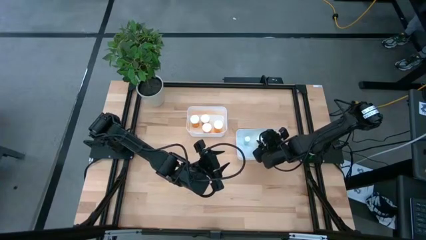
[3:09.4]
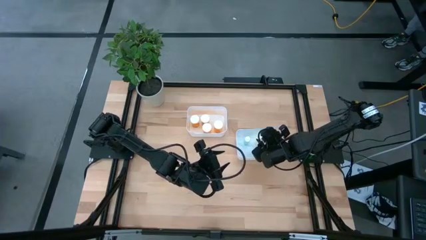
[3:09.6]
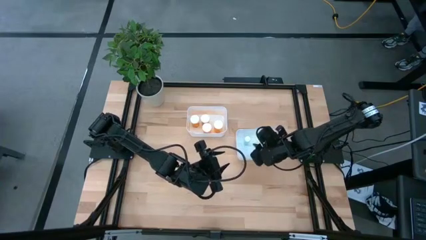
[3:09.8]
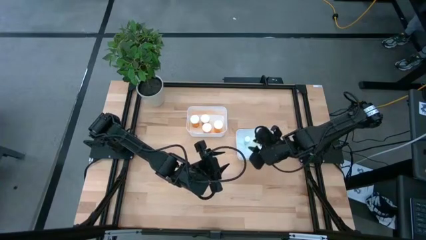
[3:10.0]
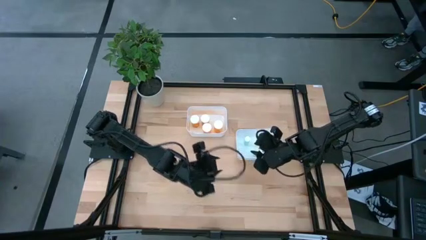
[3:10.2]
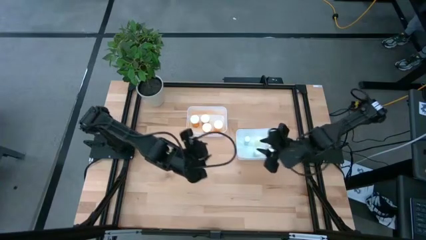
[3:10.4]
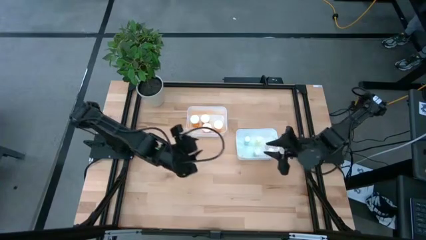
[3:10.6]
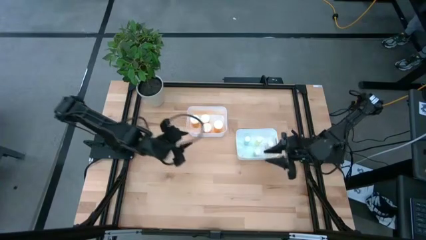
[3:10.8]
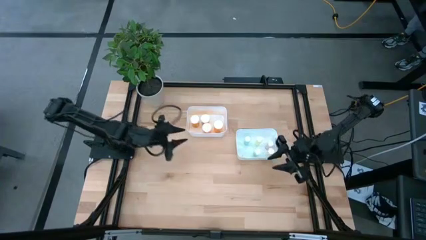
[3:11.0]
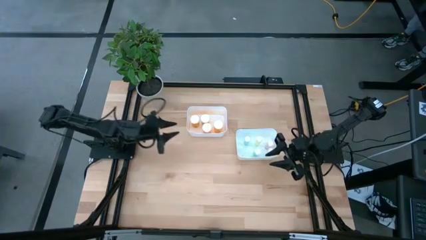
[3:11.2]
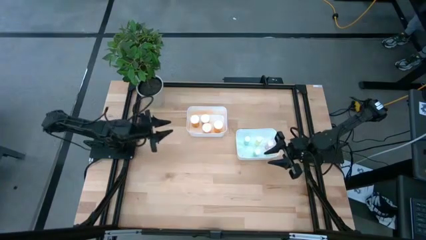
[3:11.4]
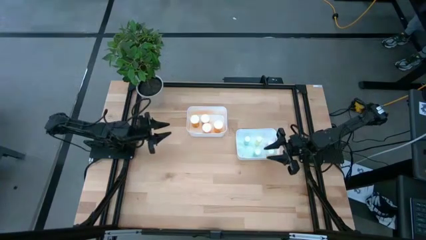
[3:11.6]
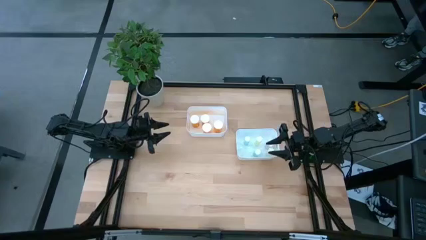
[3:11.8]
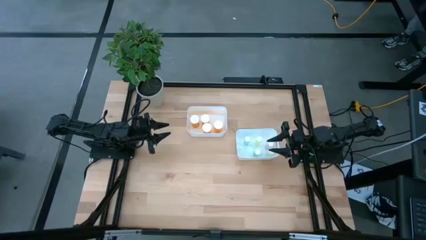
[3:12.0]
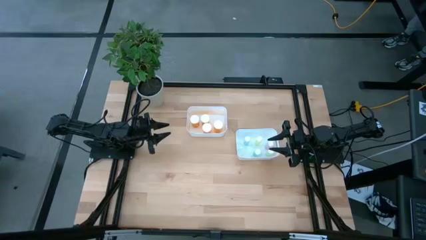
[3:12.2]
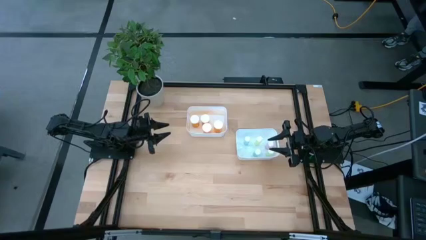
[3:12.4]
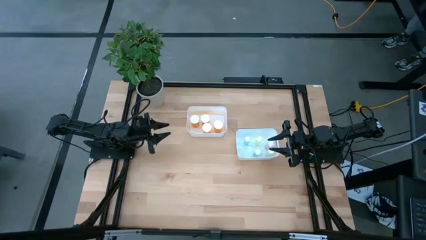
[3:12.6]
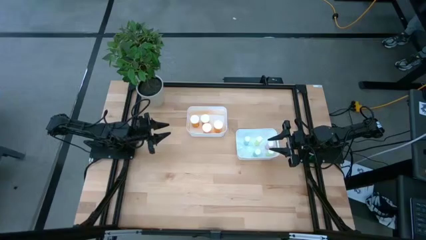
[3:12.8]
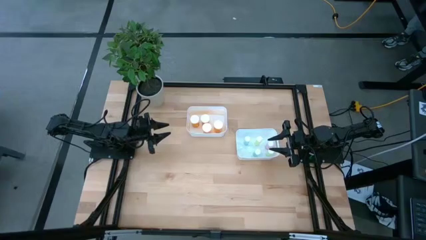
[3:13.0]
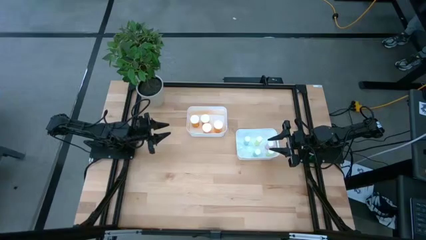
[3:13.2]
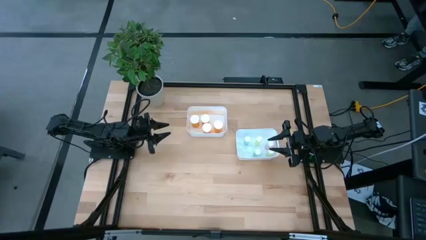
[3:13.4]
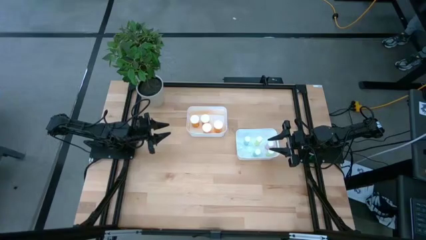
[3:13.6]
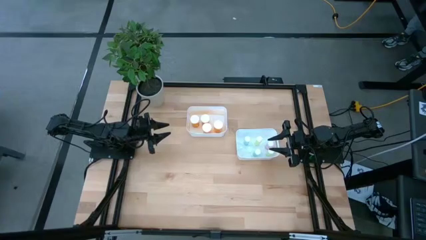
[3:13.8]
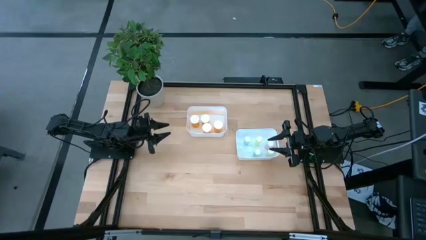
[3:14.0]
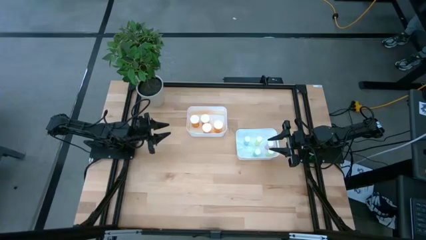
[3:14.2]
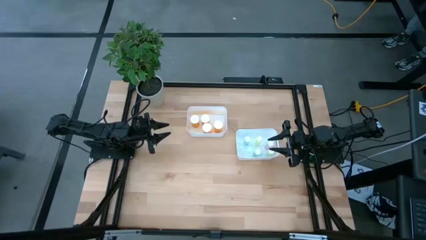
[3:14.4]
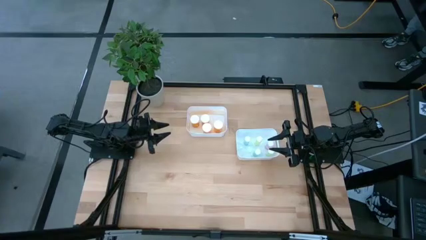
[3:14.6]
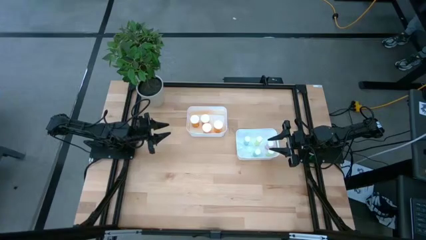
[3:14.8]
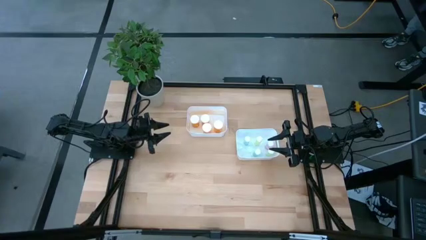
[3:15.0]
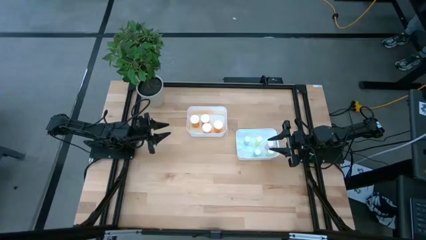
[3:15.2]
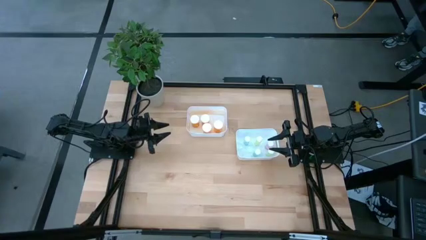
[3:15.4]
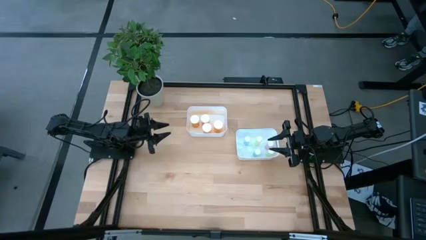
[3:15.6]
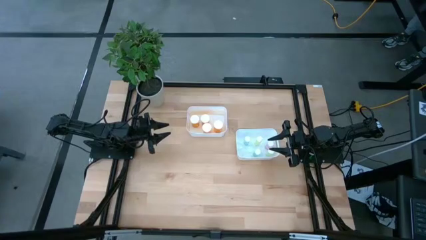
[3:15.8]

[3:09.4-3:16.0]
Task: Pick and place medicine bottles into bin by pill shape (circle, oval)
Return to Home Position

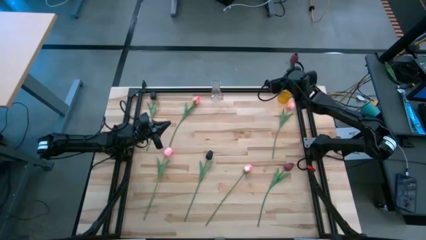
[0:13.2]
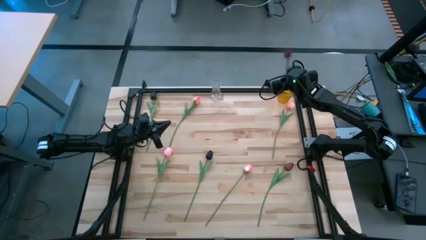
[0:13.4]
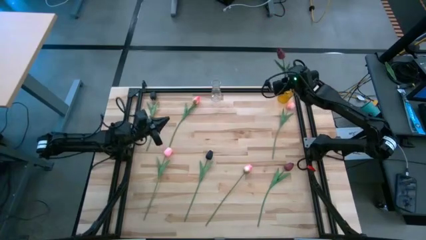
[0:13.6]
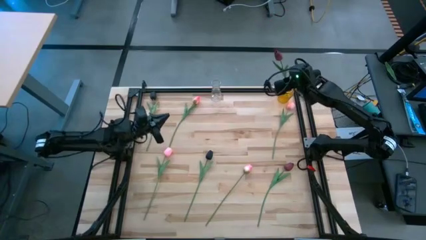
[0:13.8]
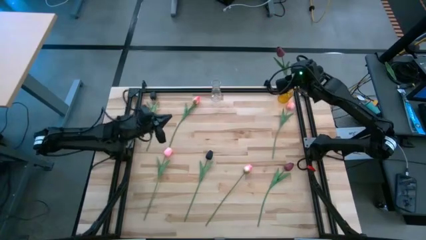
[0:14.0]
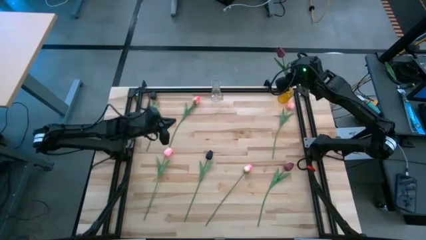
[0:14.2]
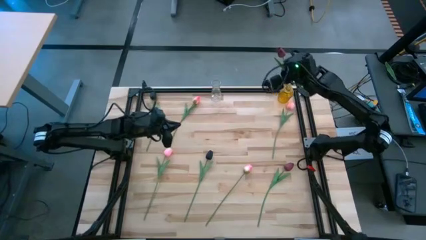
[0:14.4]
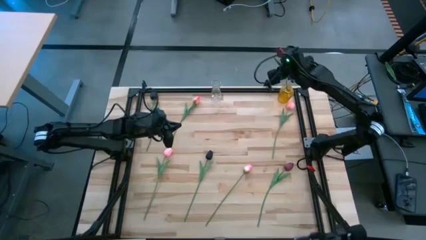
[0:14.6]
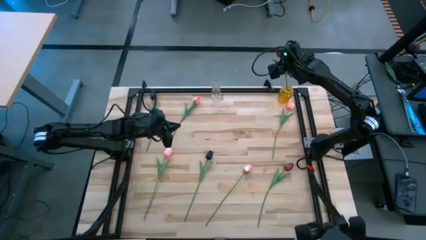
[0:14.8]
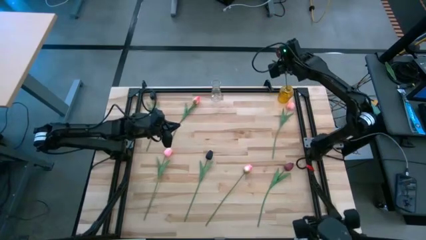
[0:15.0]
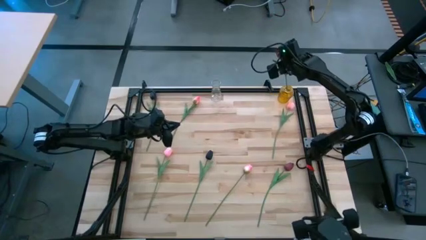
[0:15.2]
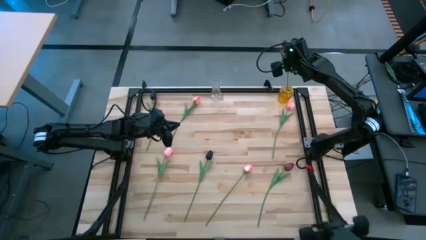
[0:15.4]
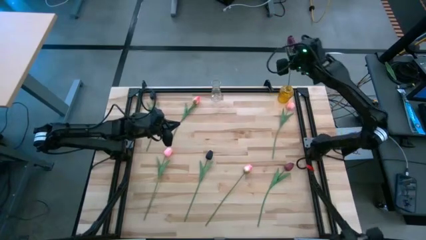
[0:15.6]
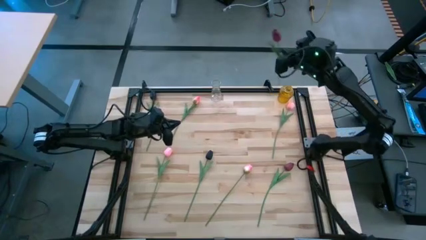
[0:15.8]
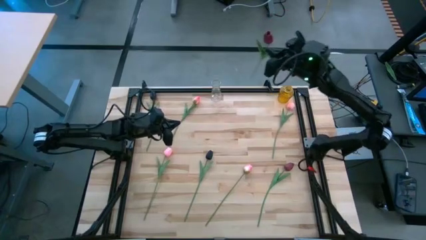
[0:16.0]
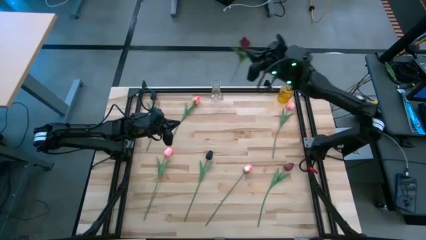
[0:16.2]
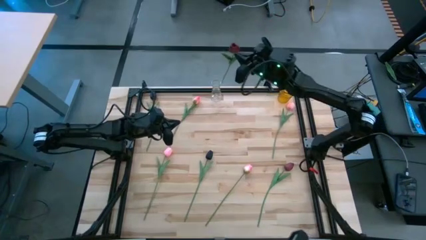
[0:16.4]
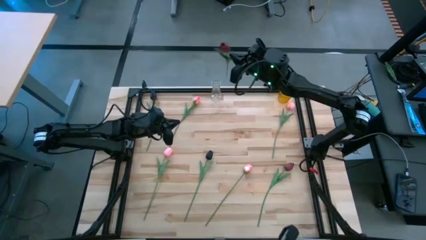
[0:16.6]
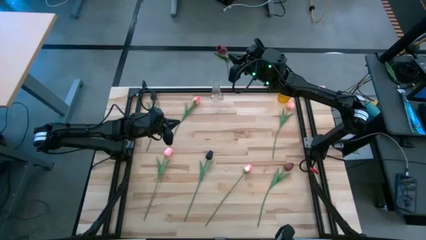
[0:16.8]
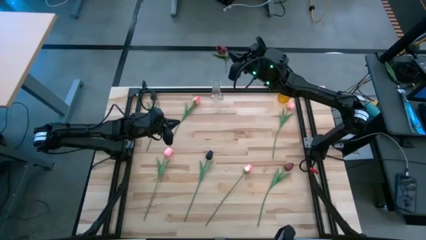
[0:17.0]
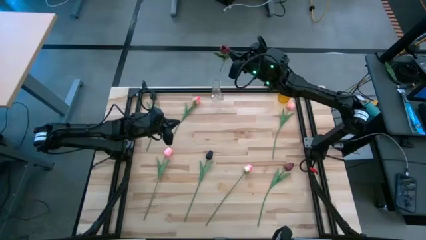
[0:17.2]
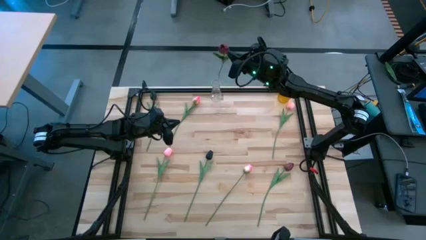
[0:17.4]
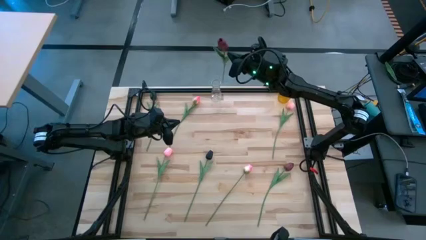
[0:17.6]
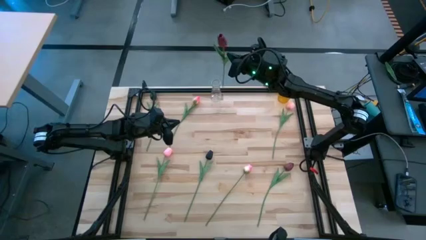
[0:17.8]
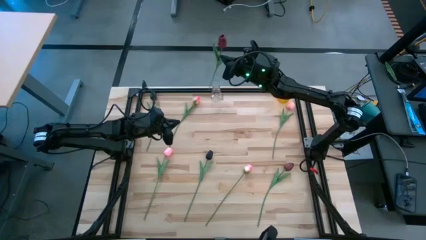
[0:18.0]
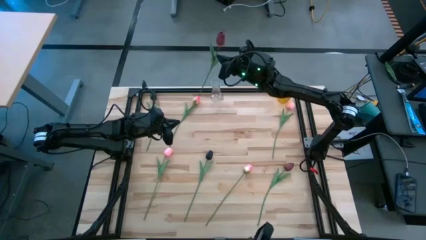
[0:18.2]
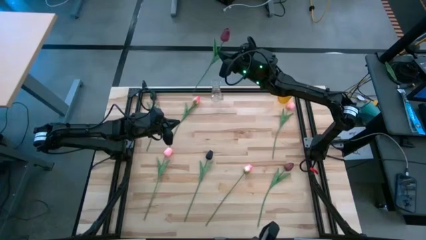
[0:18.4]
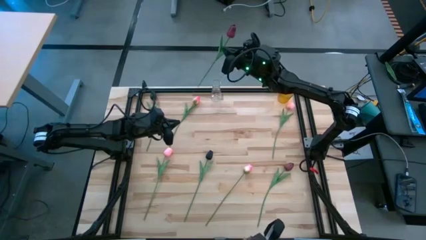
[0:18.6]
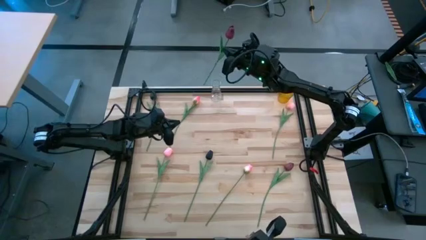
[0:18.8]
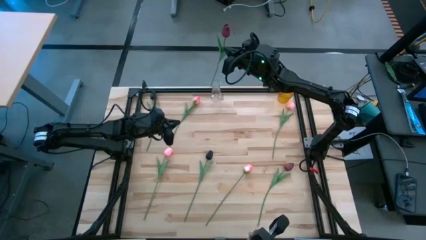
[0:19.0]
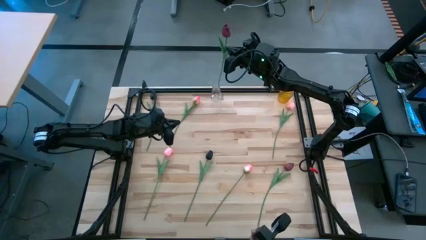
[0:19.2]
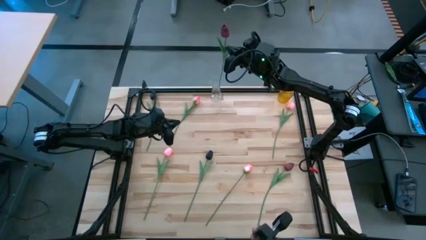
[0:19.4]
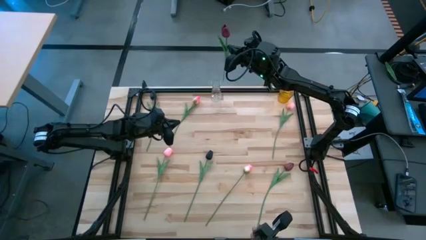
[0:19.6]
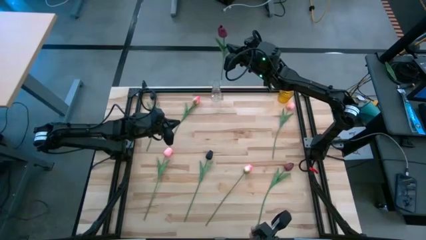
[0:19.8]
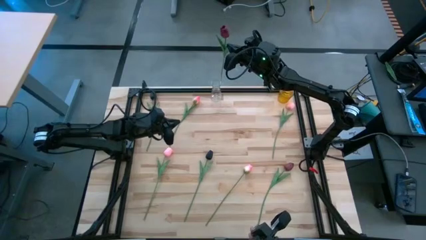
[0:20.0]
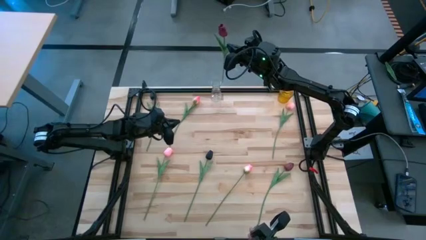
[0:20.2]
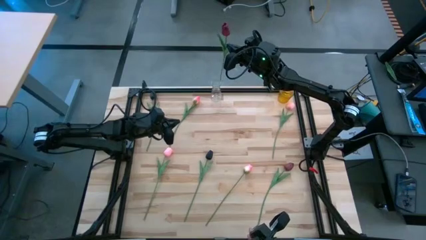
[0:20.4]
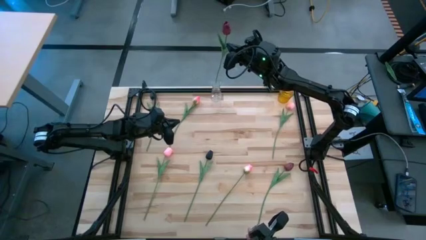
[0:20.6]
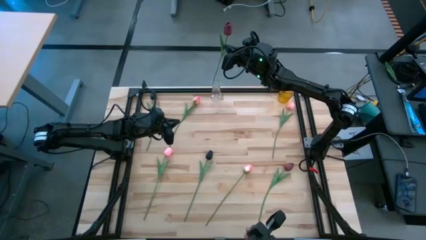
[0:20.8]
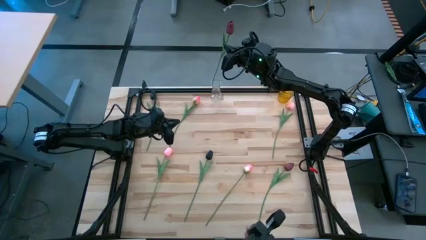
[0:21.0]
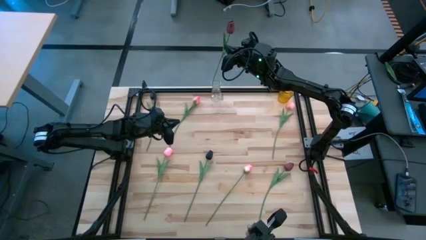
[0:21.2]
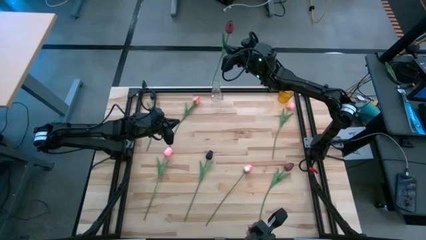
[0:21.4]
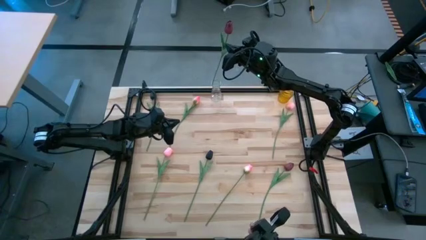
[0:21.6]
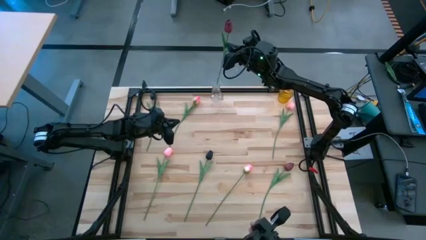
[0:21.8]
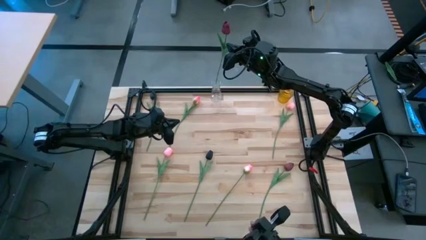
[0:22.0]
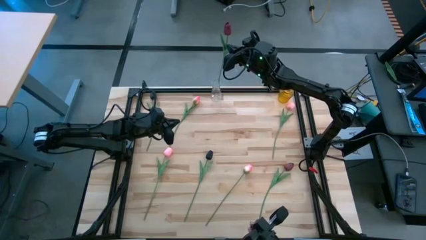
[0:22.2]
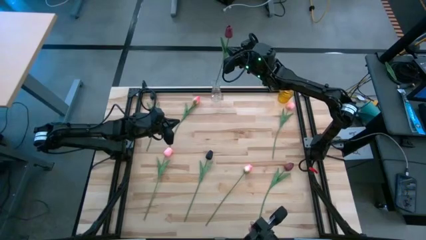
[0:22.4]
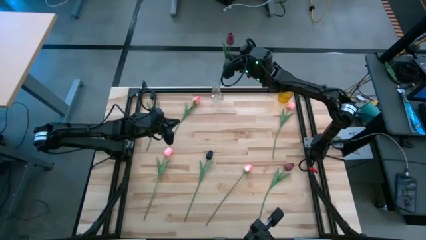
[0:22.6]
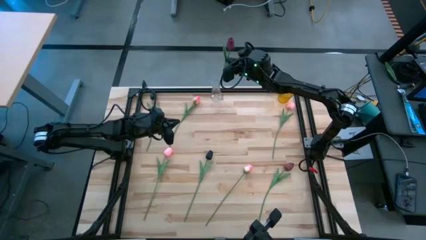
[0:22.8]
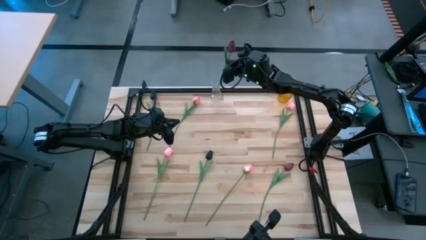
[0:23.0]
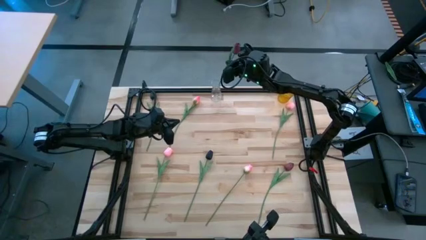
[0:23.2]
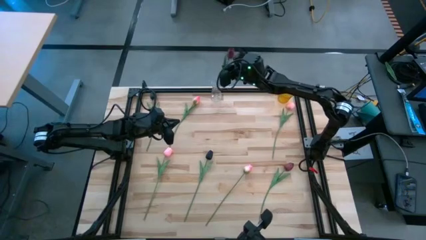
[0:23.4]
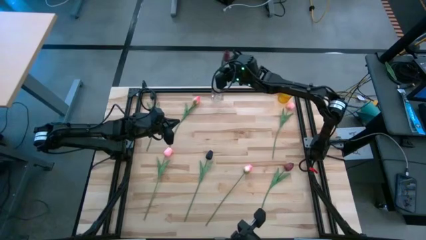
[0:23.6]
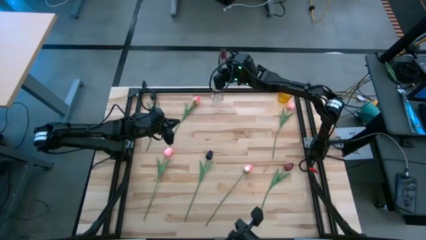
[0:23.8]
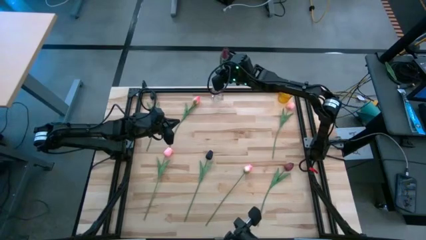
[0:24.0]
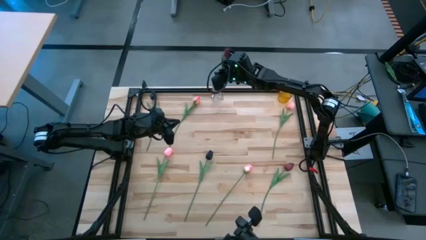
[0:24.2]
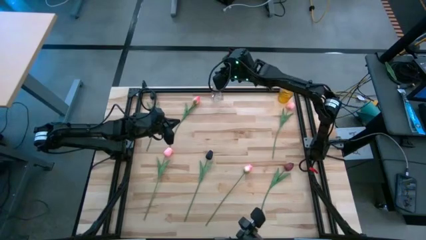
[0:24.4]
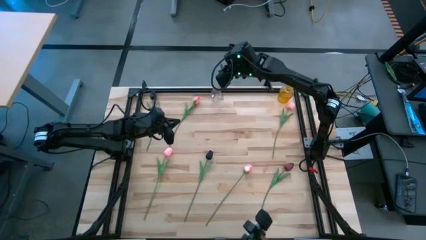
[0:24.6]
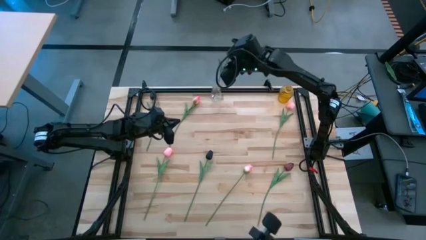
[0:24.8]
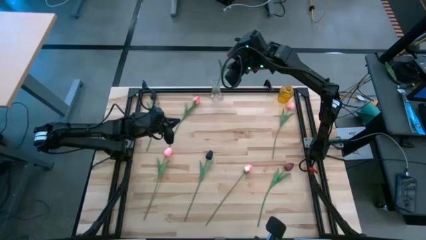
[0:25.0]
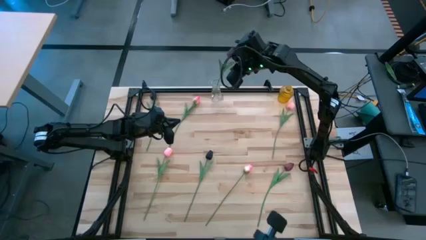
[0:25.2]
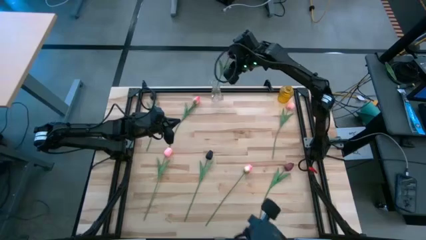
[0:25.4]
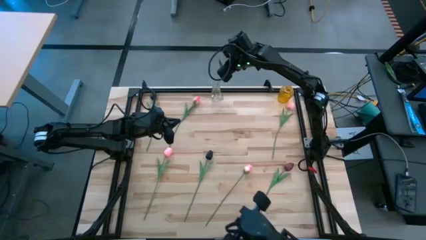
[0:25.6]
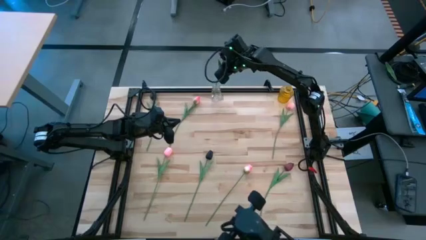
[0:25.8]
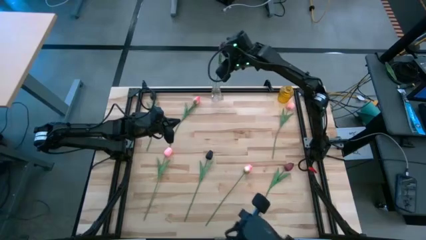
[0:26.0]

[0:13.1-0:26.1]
Task: Sort flowers into vase by color
Put the top red tulip into the crystal vase
